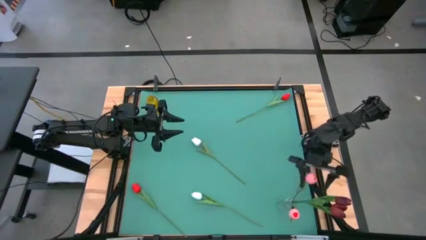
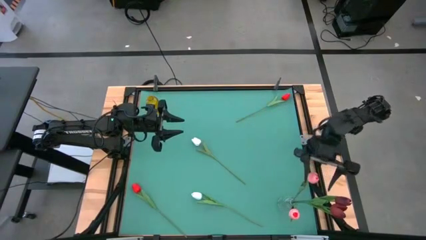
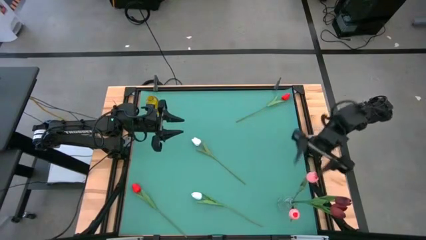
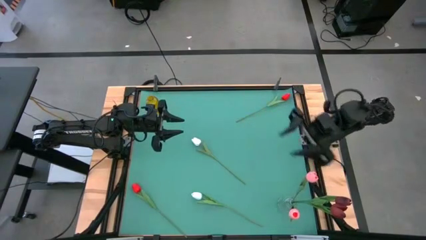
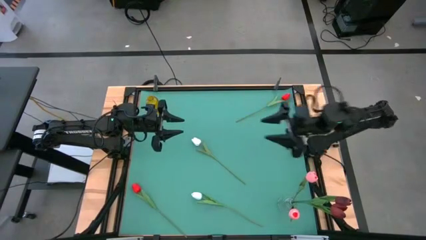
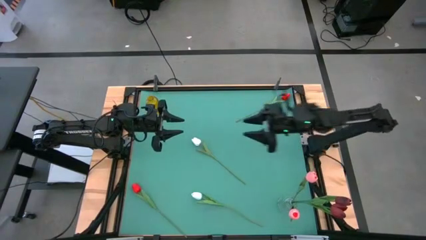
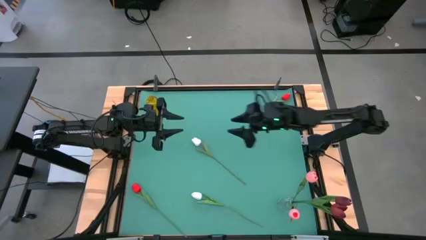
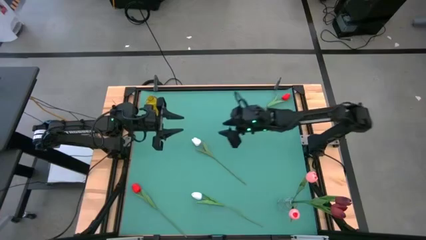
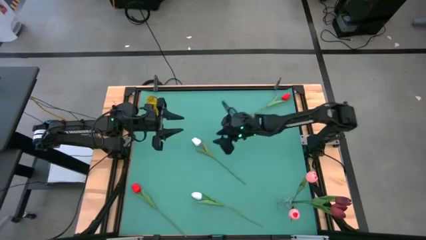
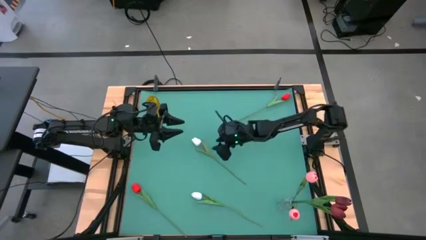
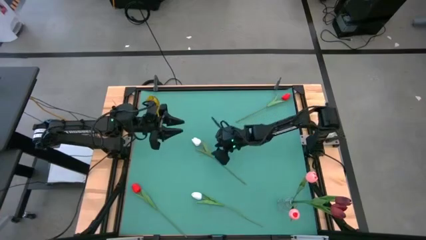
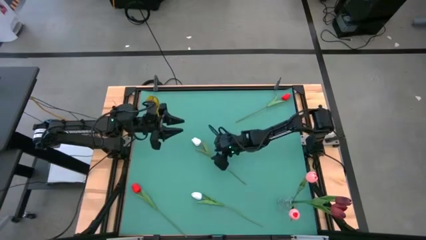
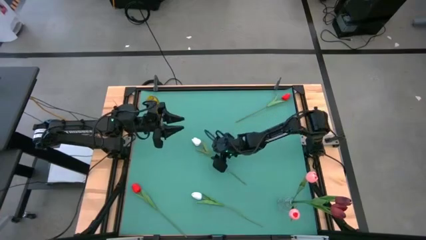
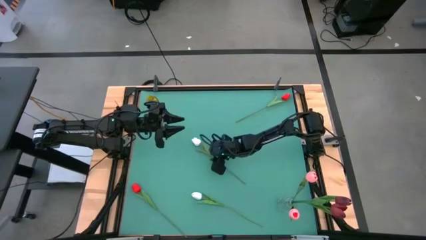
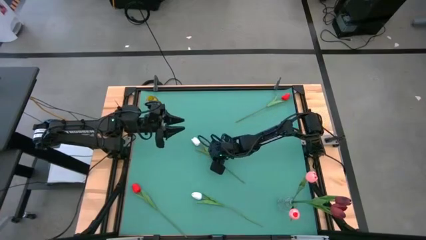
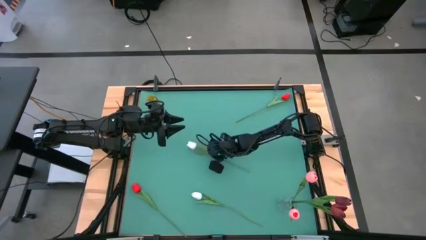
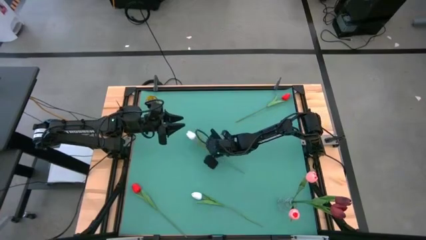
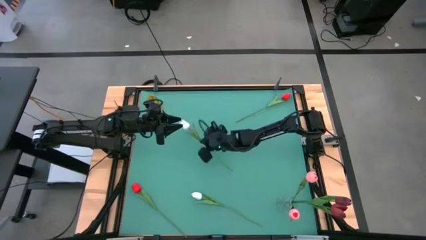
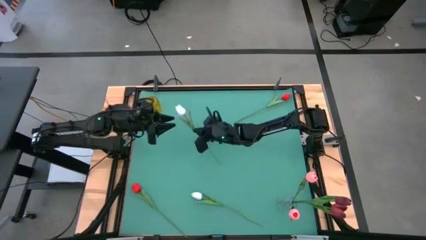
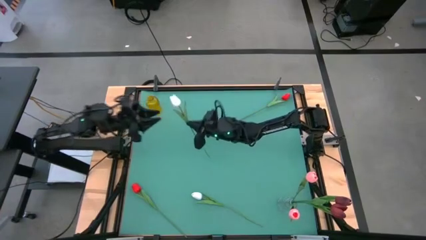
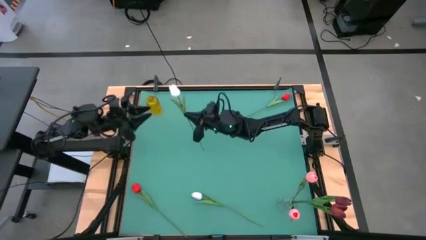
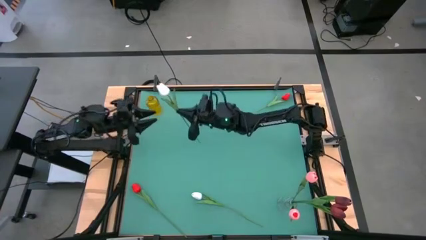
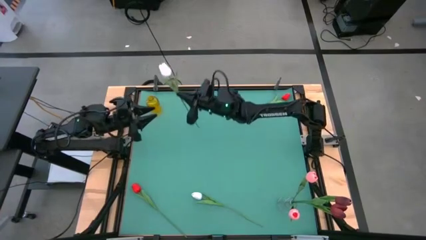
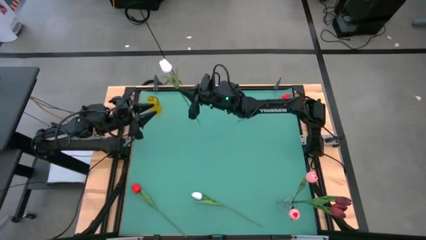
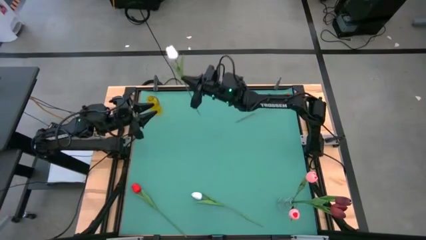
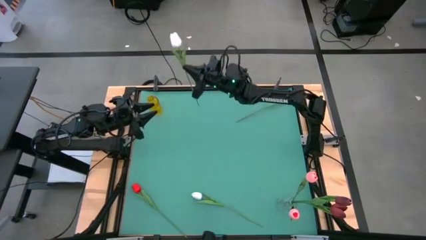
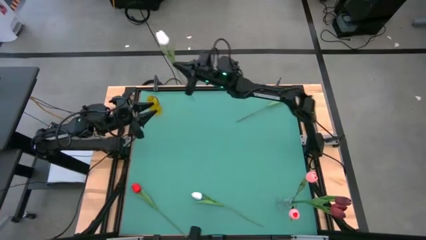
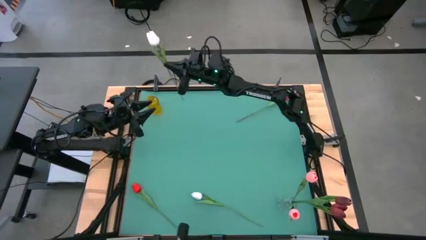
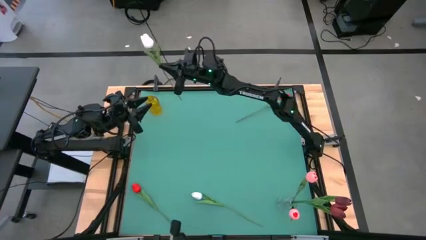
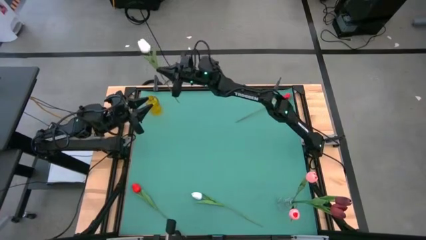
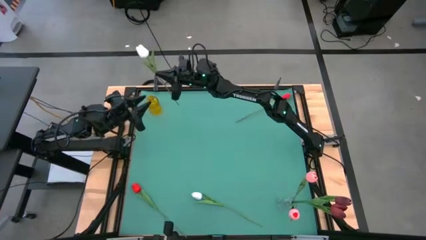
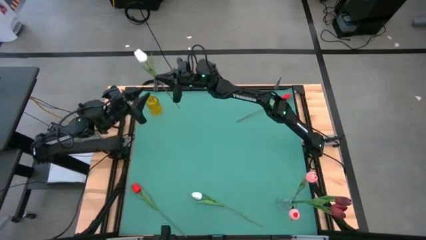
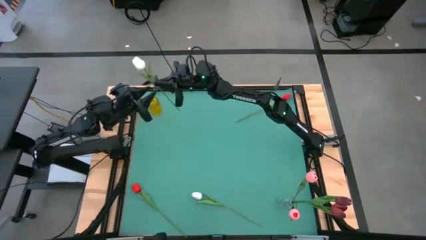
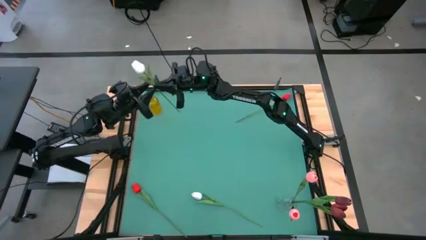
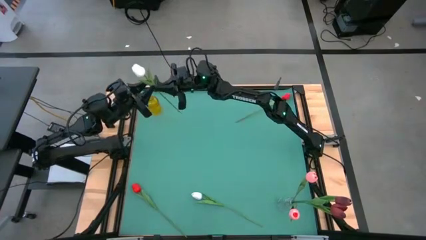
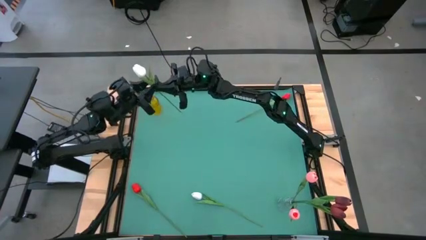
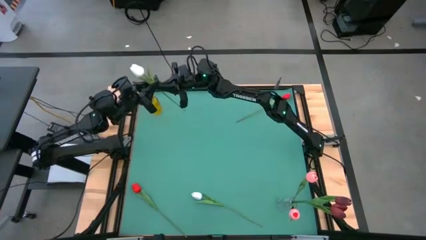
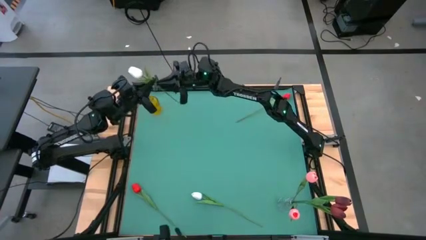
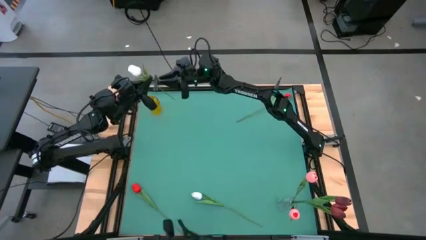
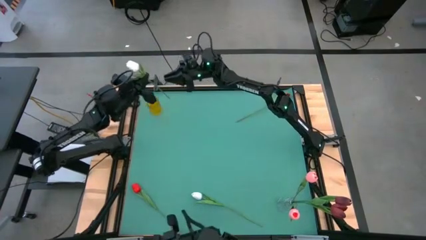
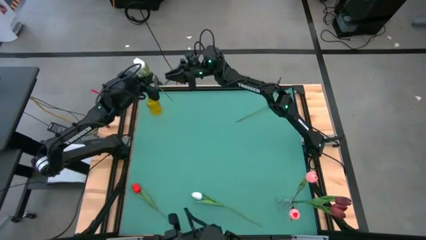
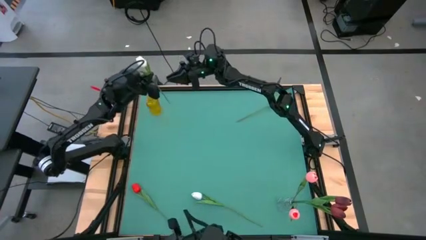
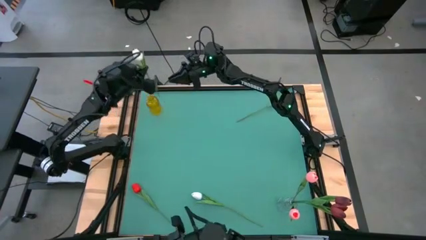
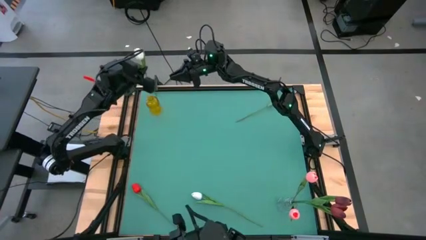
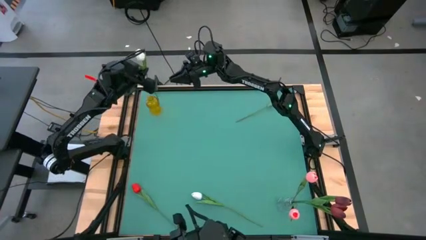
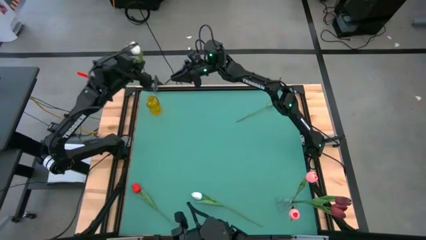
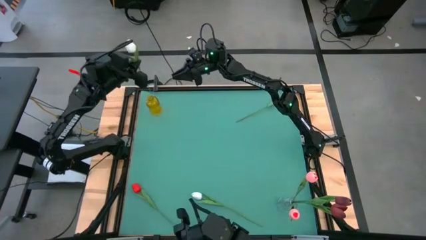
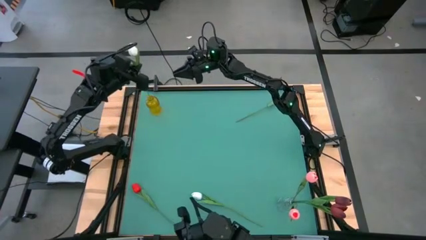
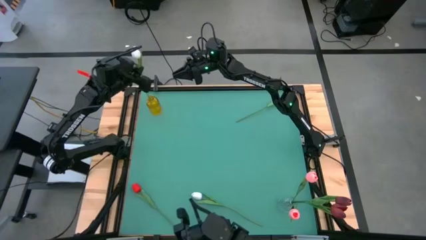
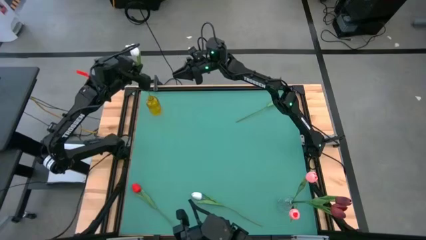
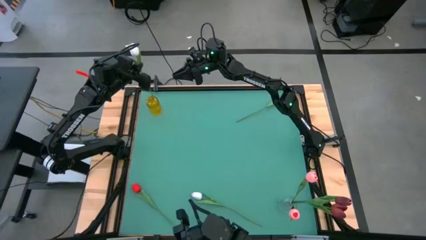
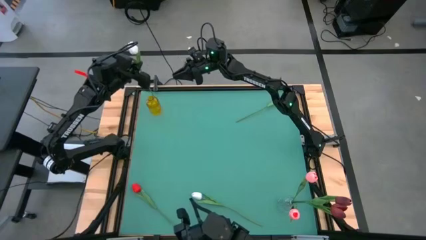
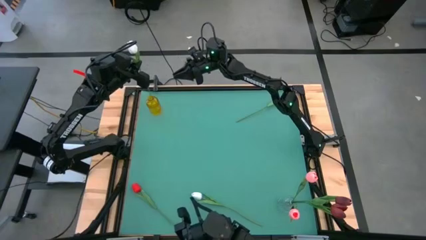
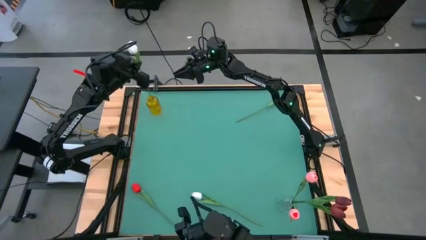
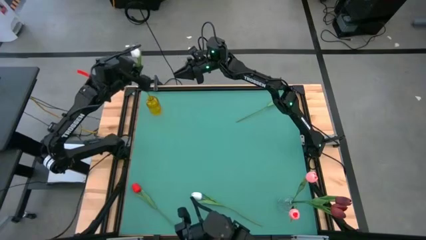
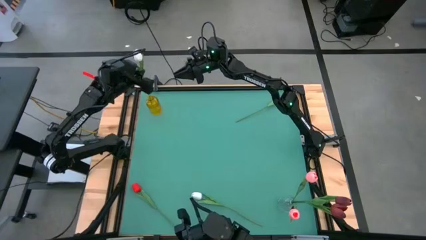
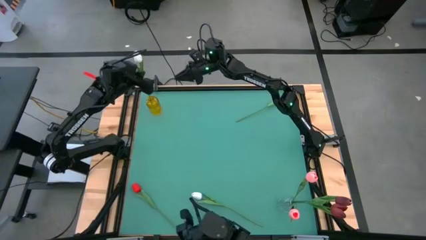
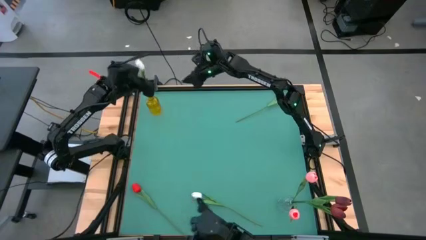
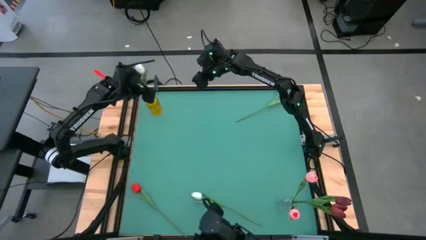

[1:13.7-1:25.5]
Task: Sort flowers into vase by color
Put the top white tulip into the yellow vase
